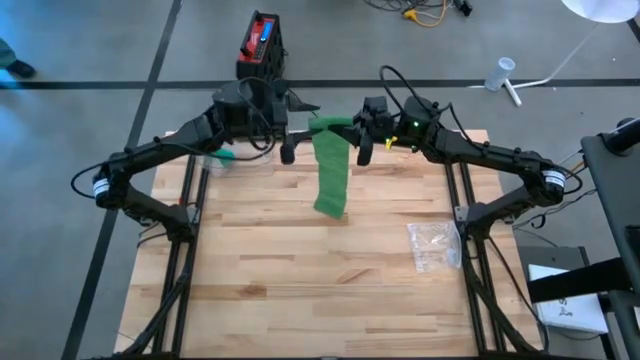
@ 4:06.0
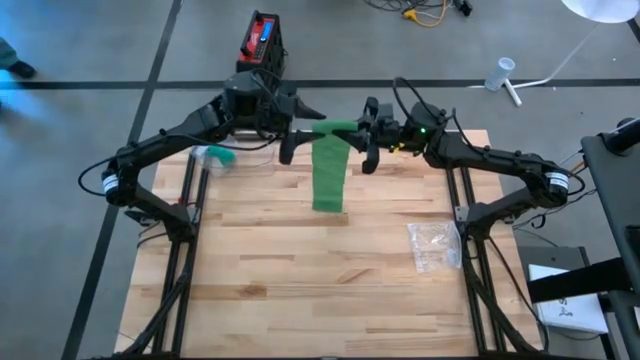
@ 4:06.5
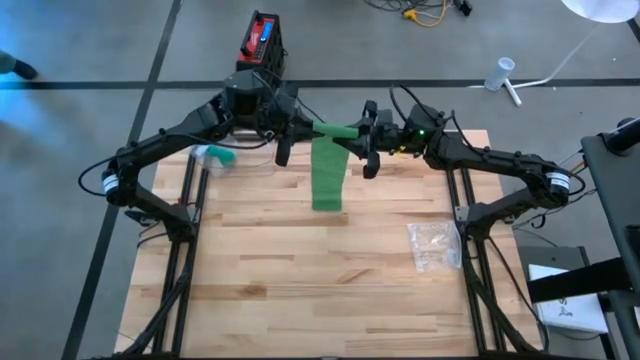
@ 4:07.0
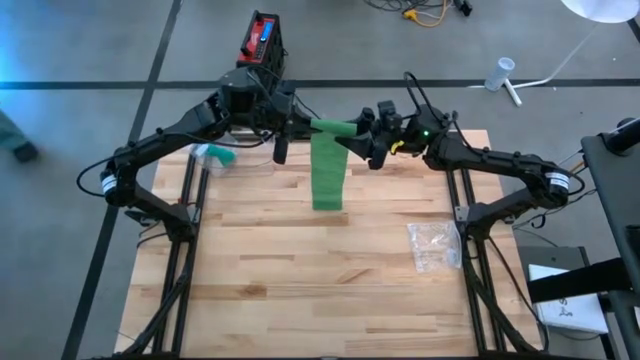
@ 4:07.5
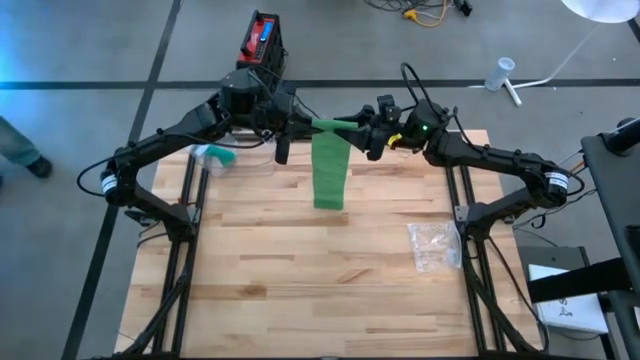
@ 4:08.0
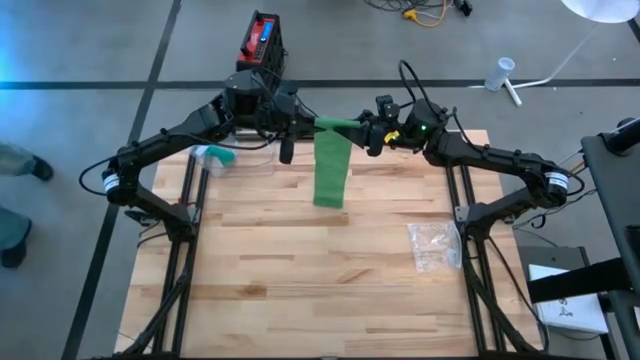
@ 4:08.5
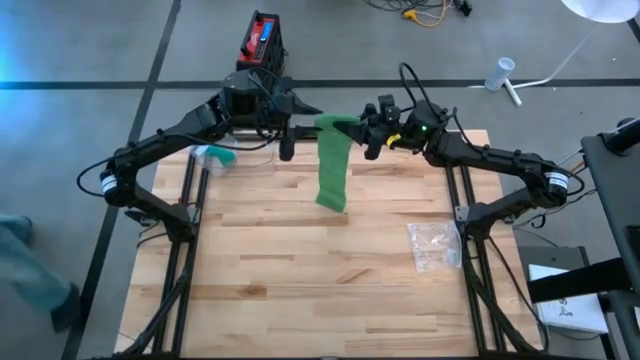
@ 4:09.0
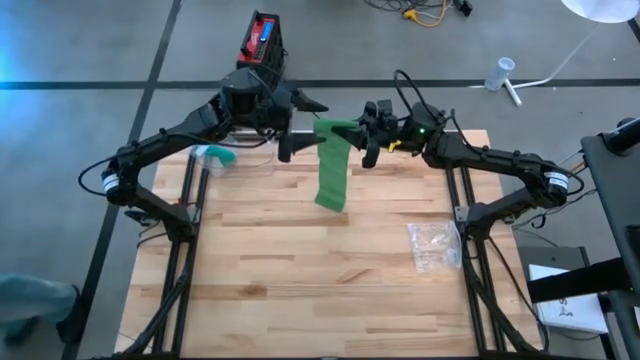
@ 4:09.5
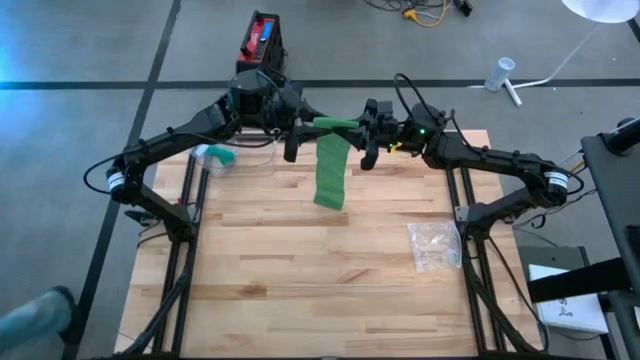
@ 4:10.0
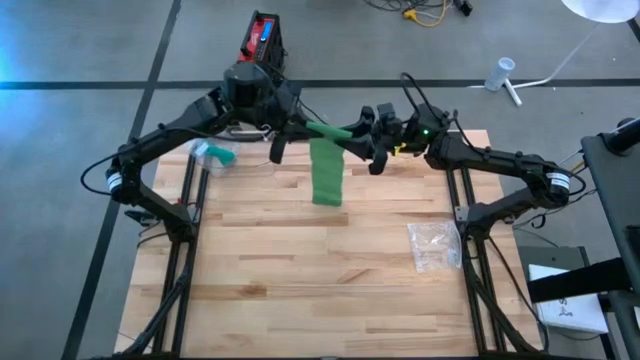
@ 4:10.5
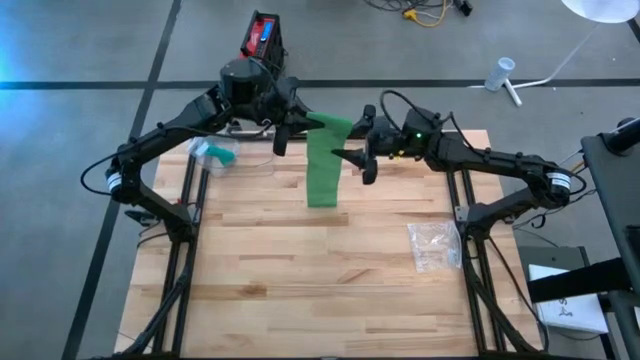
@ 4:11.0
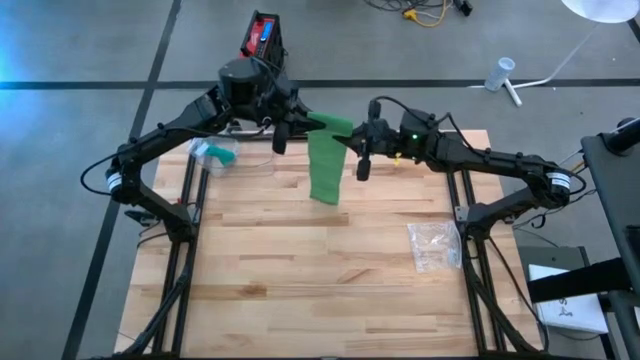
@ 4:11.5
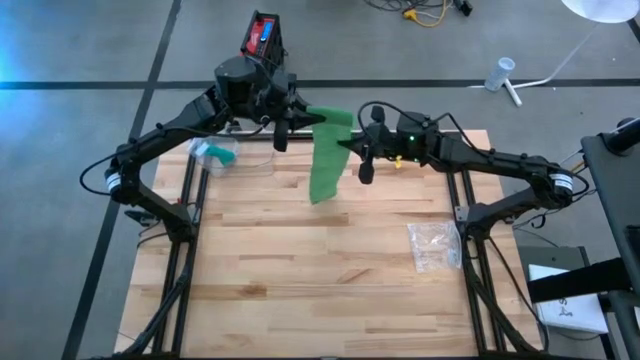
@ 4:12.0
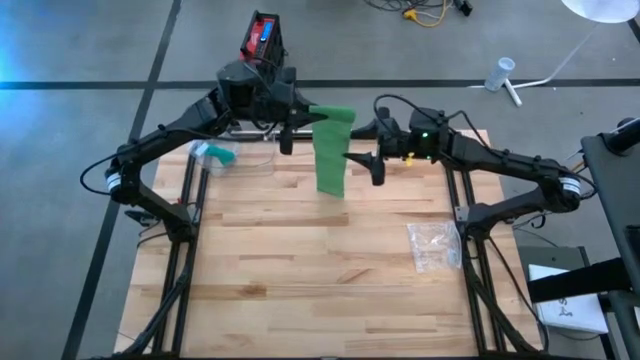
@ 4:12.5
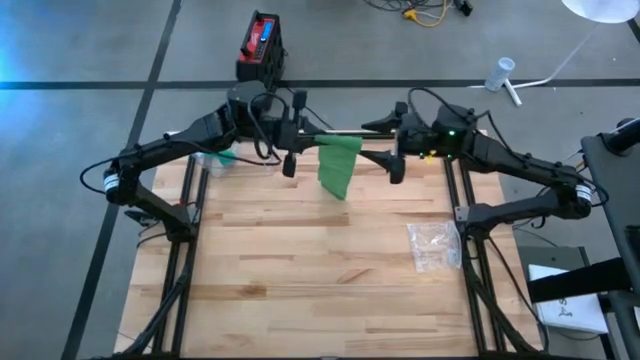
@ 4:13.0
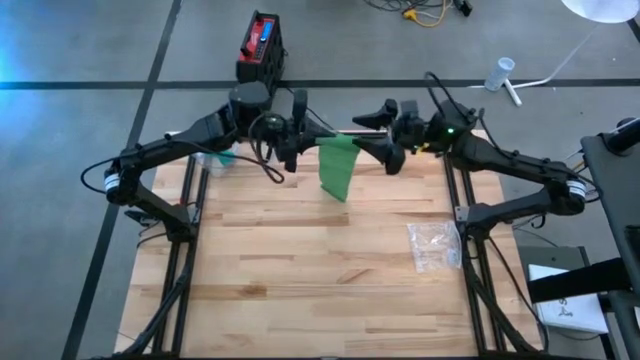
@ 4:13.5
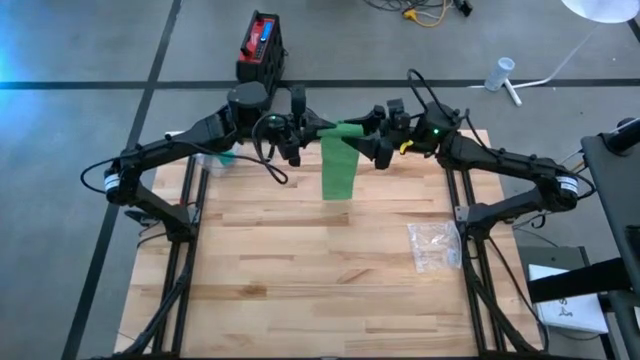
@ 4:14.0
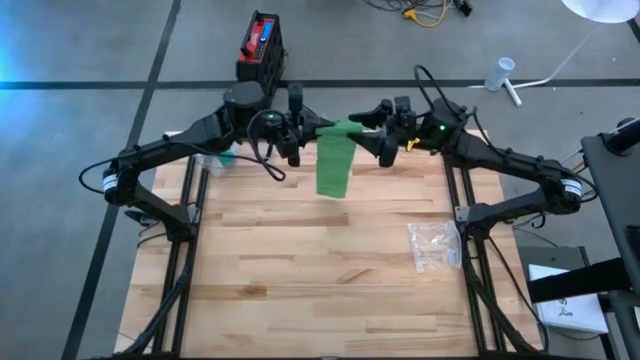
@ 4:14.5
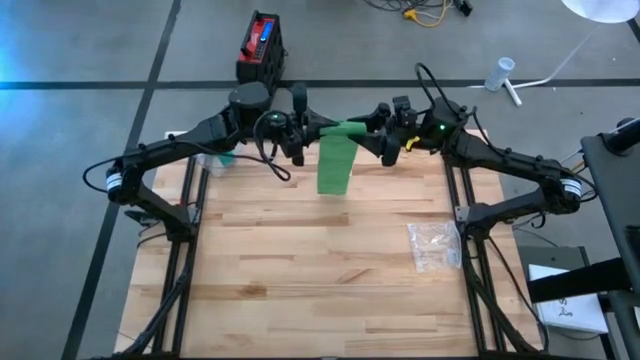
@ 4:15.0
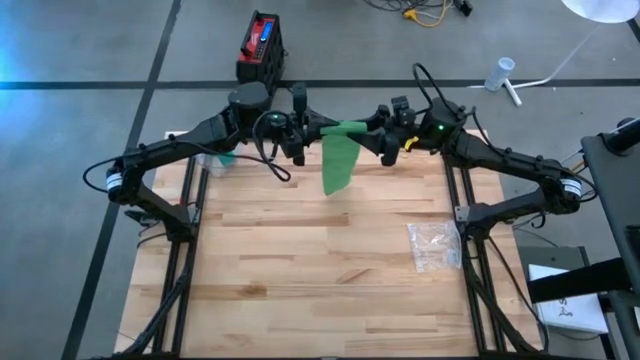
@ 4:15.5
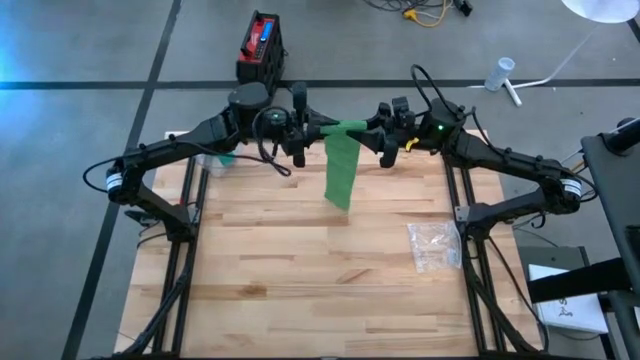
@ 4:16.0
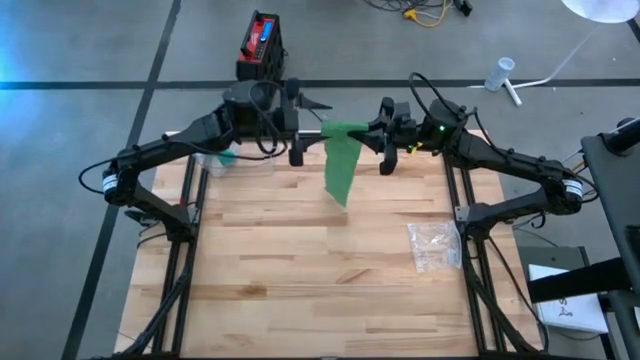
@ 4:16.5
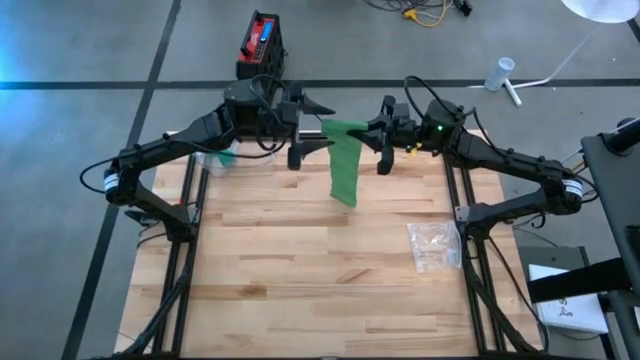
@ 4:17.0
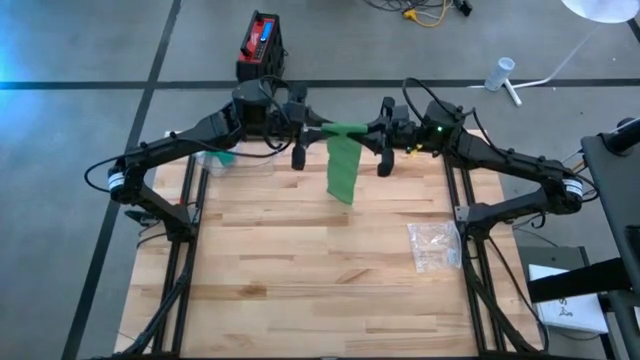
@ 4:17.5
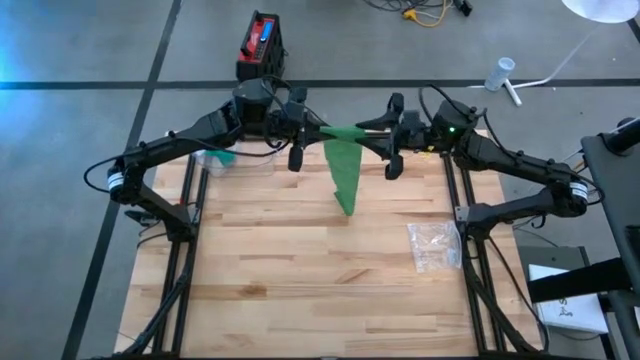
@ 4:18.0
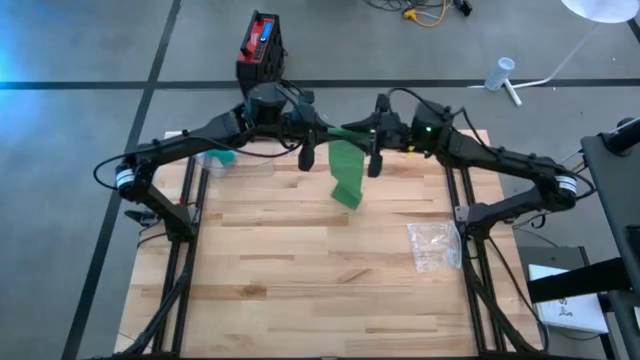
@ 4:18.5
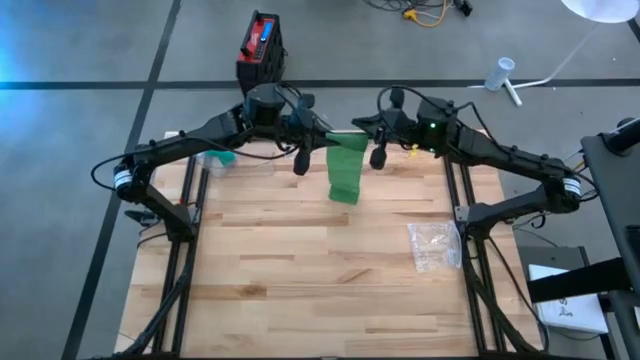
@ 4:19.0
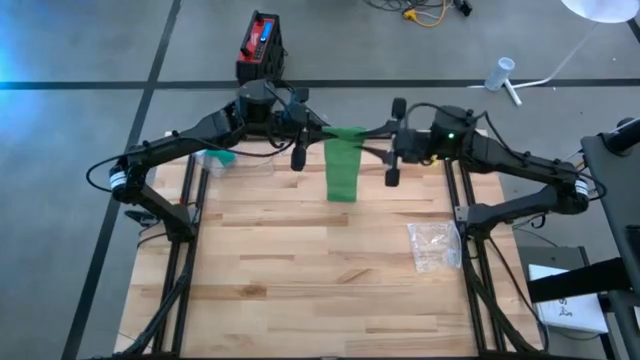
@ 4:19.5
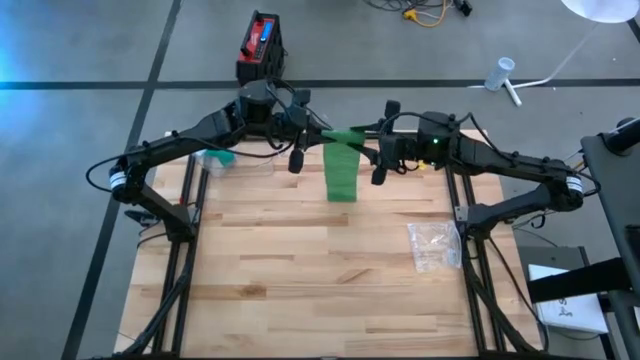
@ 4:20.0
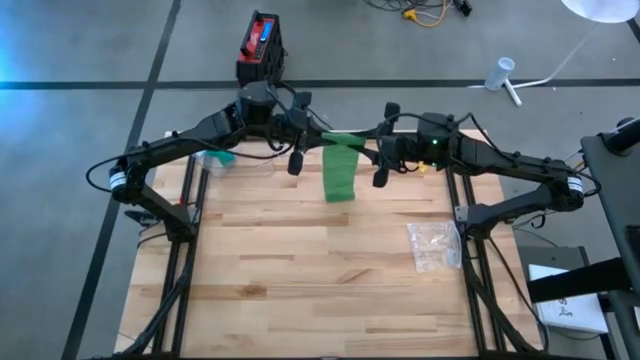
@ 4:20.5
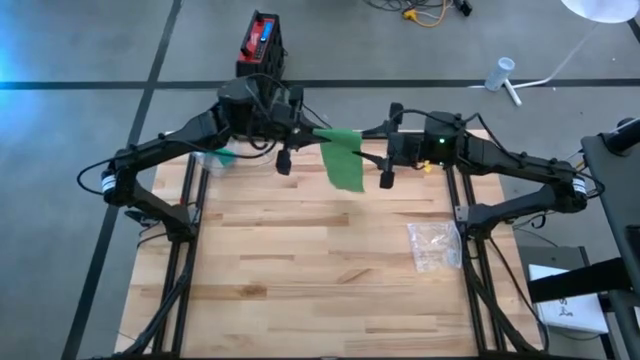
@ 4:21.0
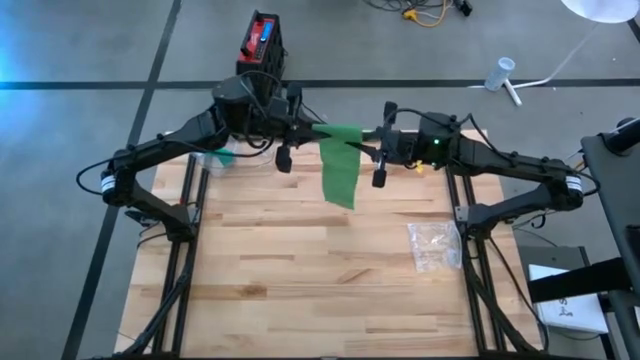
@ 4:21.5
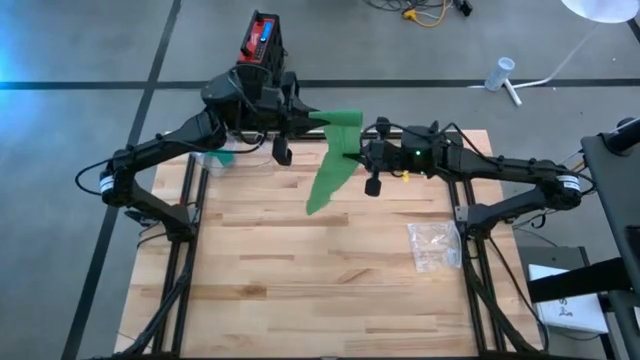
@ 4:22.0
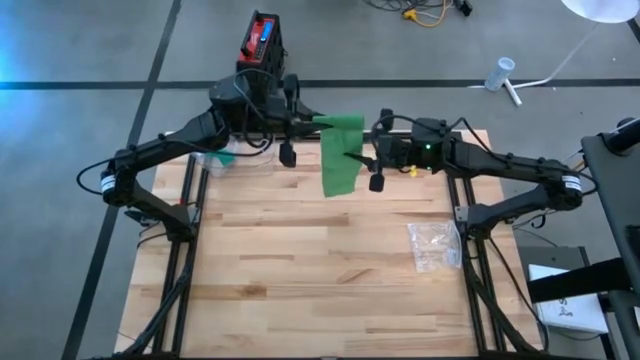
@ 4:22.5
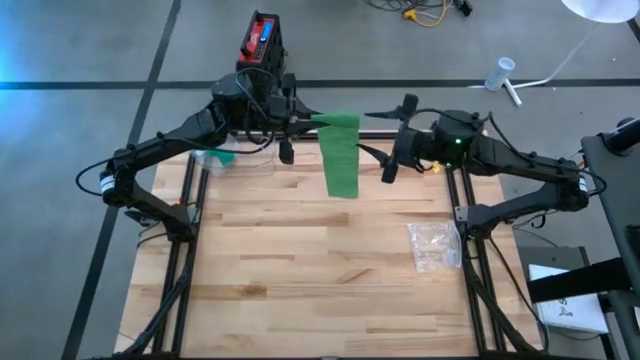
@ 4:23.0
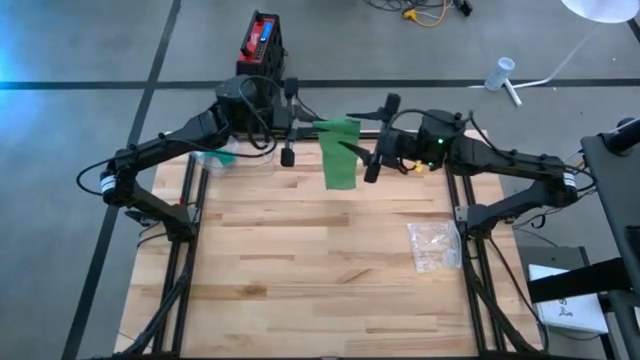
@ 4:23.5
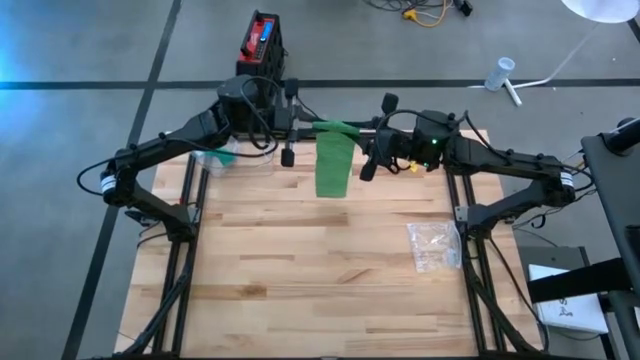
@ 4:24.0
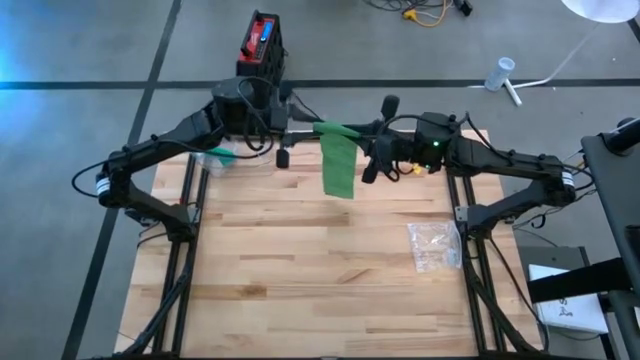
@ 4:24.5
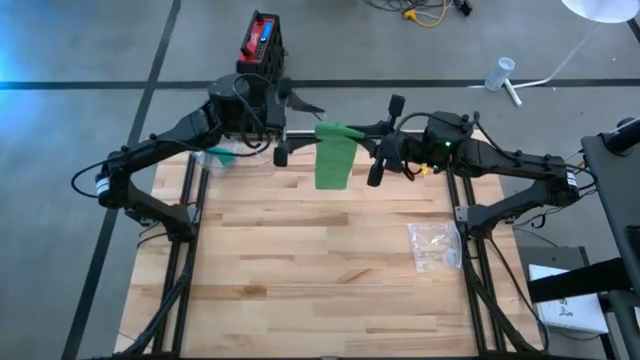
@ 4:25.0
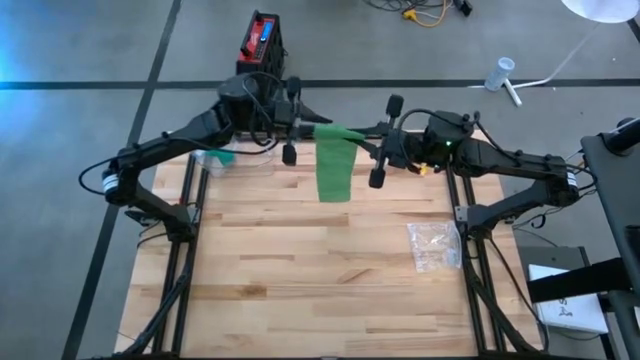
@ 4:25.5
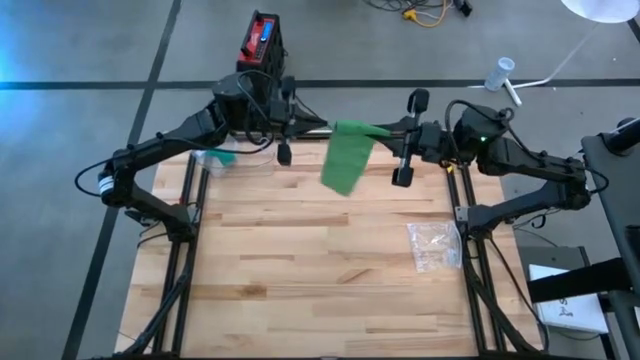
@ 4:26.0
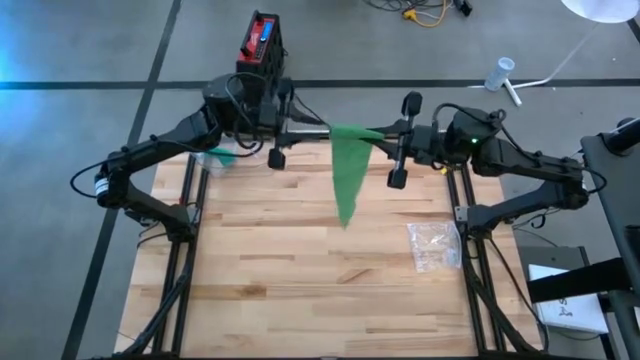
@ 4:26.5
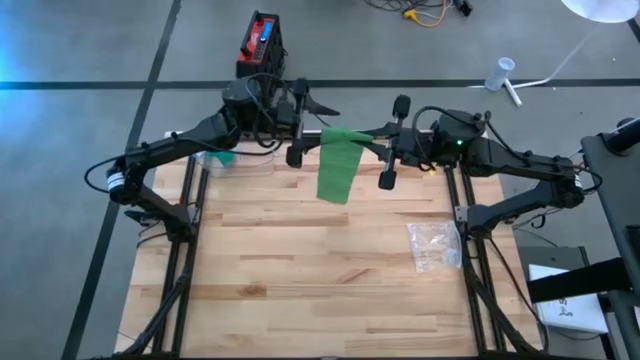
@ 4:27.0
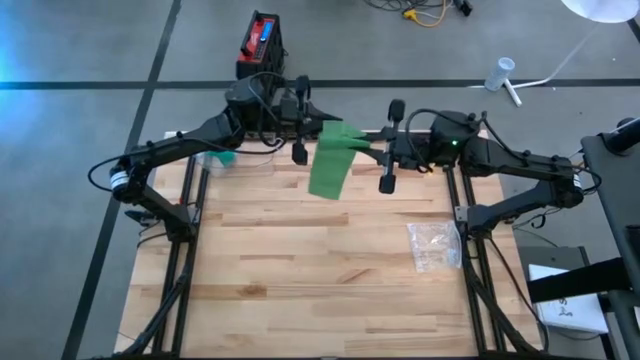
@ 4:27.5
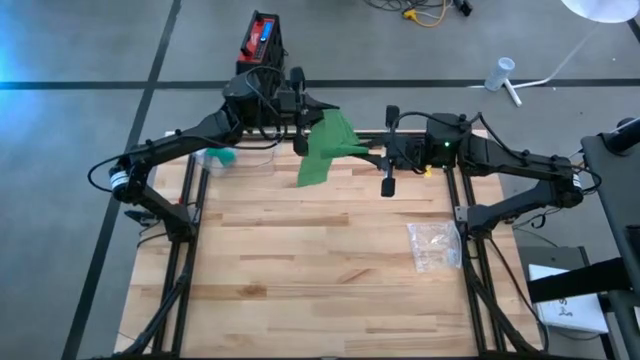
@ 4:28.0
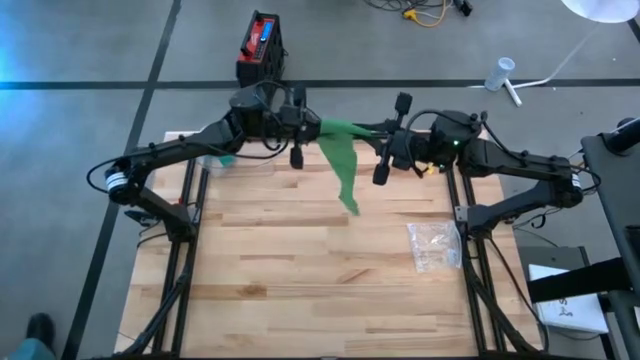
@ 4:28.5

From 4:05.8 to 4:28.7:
Task: Roll bandage
Roll the green bandage
